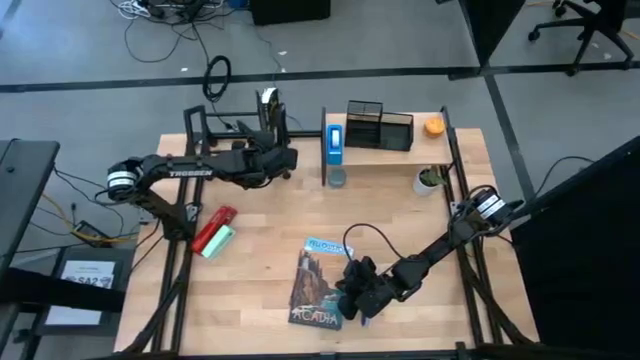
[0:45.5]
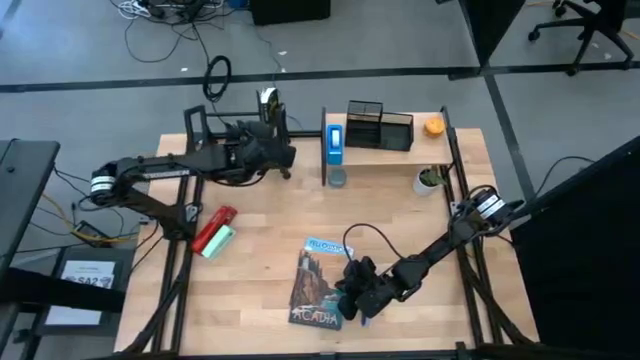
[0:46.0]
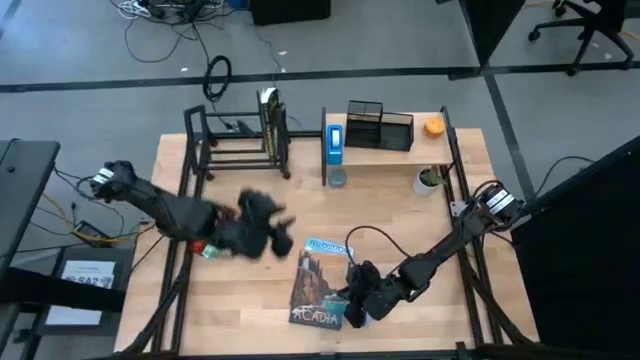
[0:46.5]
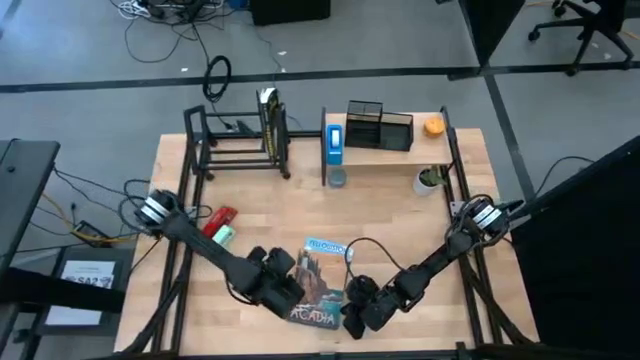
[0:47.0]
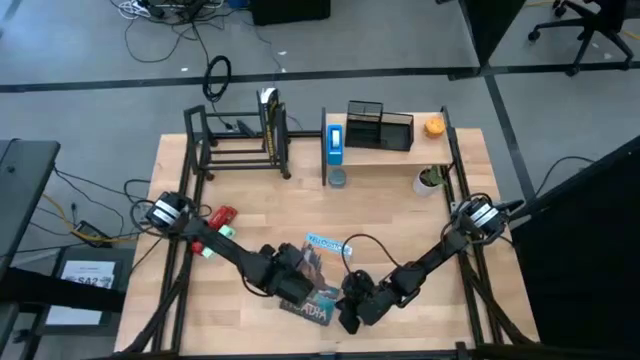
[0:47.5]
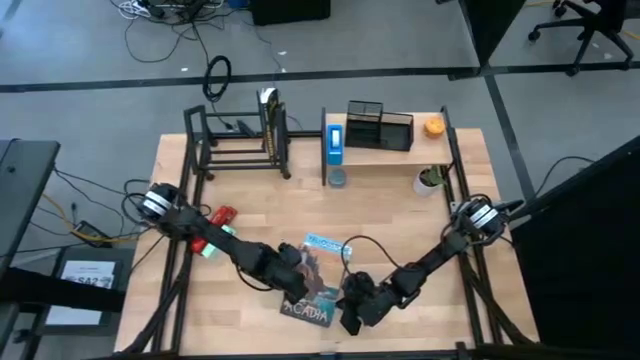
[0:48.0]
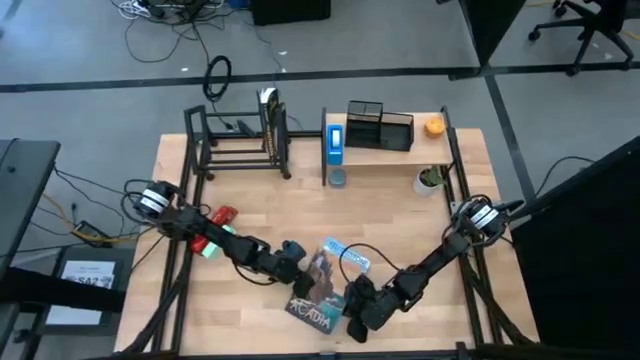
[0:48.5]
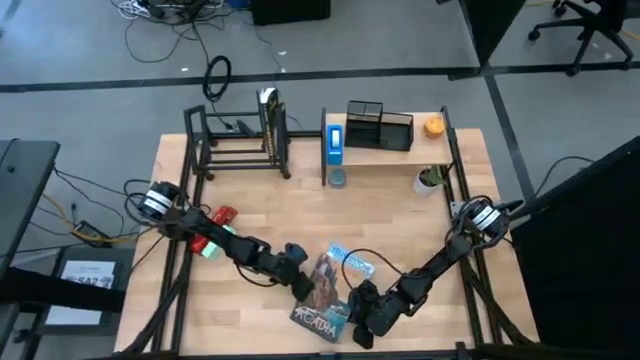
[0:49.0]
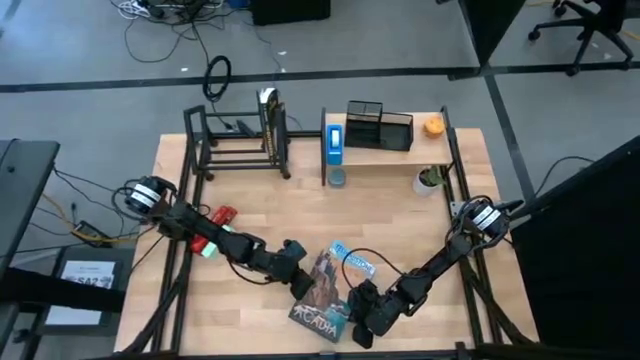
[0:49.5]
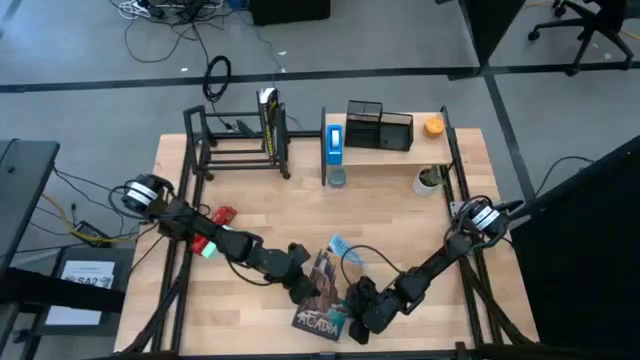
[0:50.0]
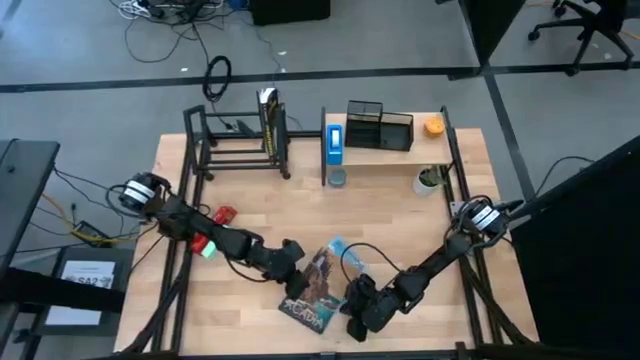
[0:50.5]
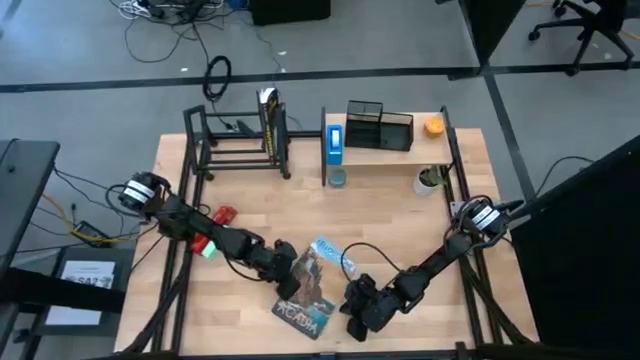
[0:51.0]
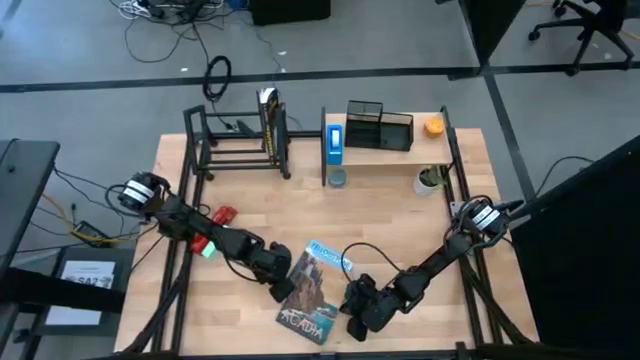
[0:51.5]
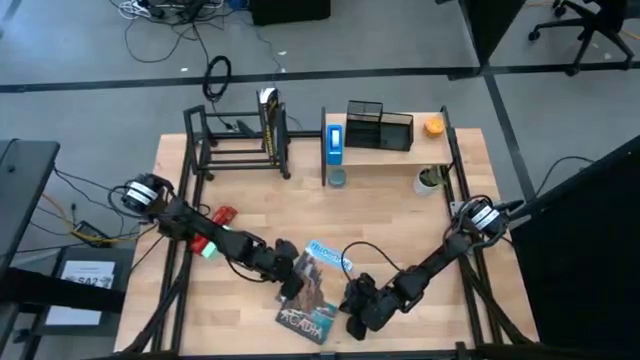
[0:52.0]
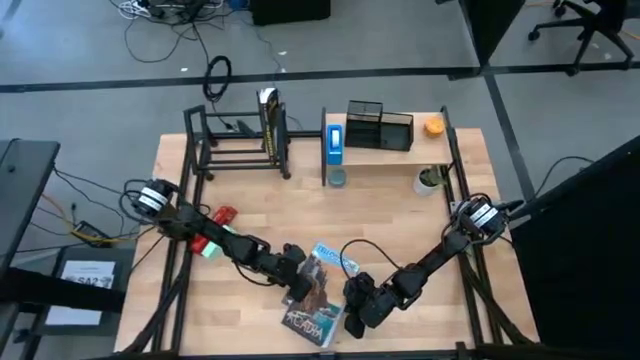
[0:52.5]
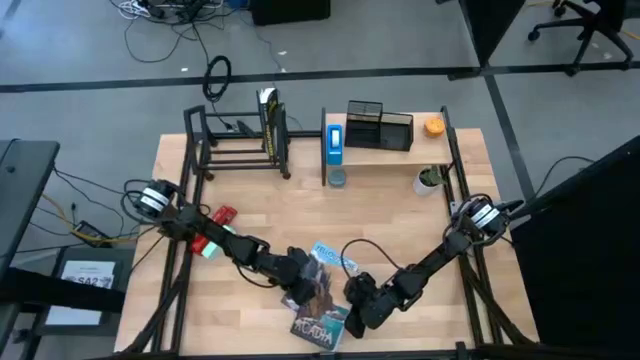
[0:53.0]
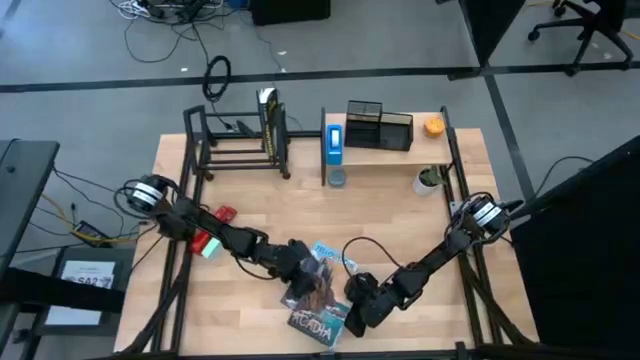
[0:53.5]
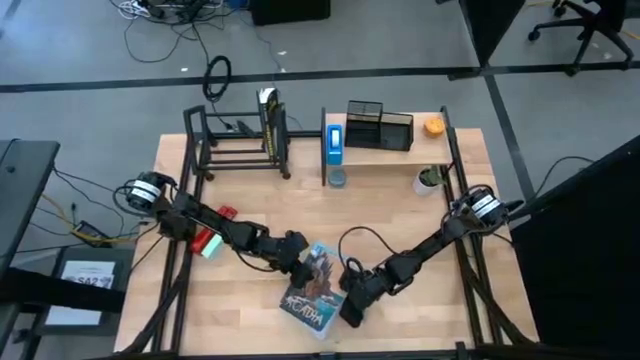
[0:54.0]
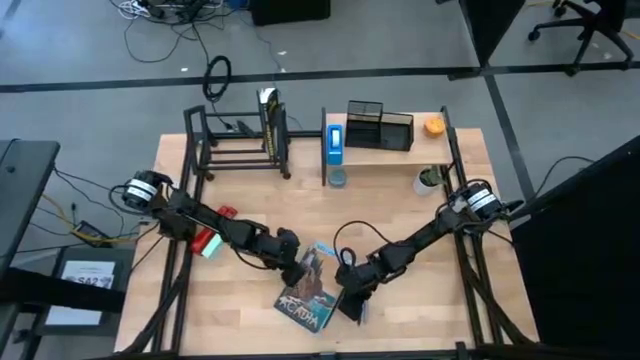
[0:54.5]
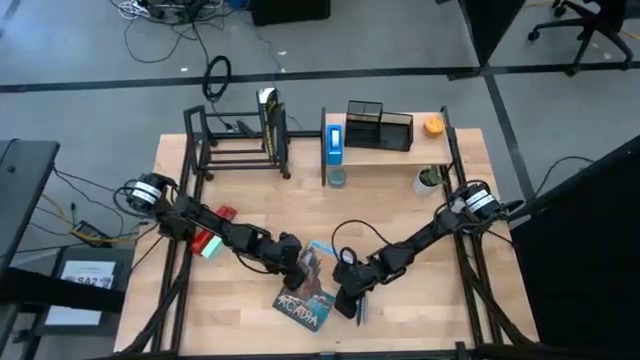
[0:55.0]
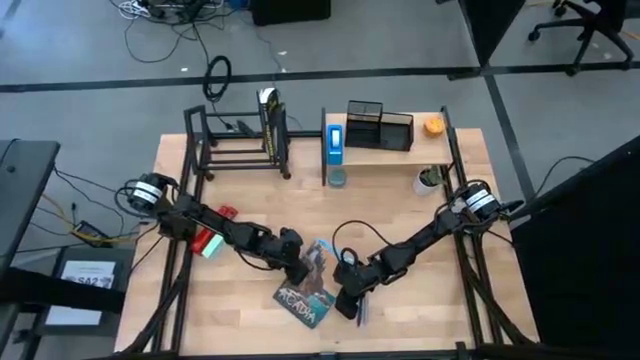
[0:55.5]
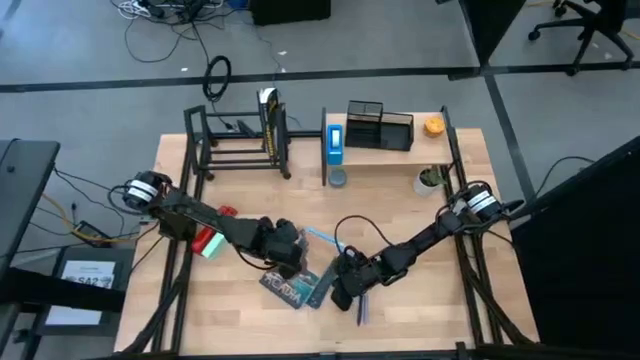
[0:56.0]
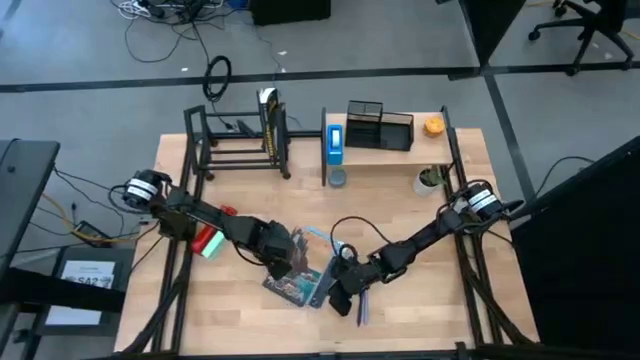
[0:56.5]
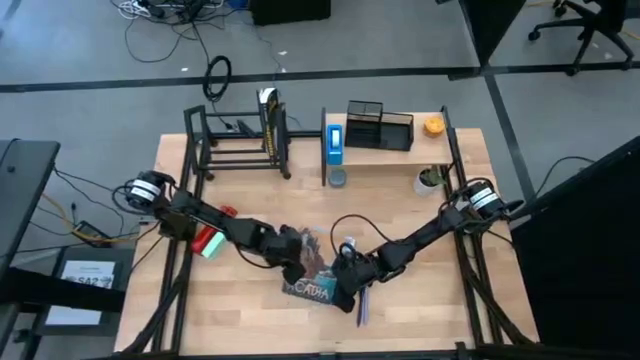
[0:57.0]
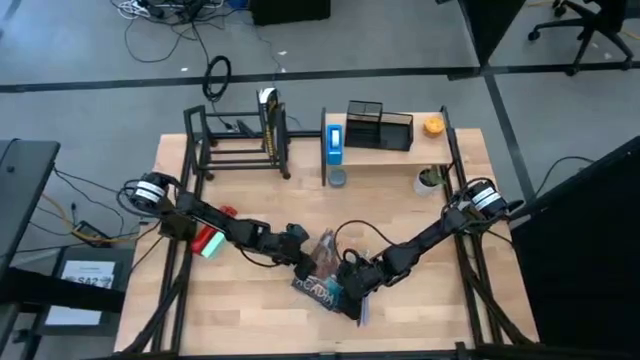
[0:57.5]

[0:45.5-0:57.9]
Task: Stock shelves
Put the brown book on the book organizer

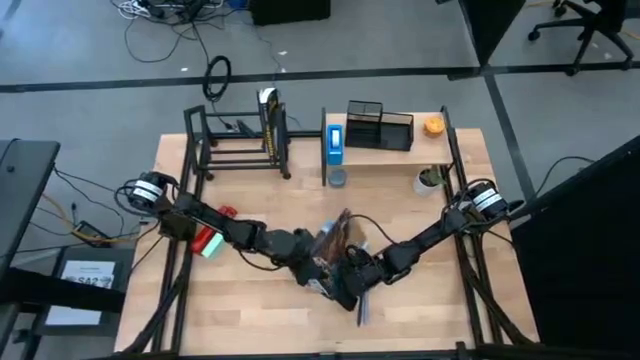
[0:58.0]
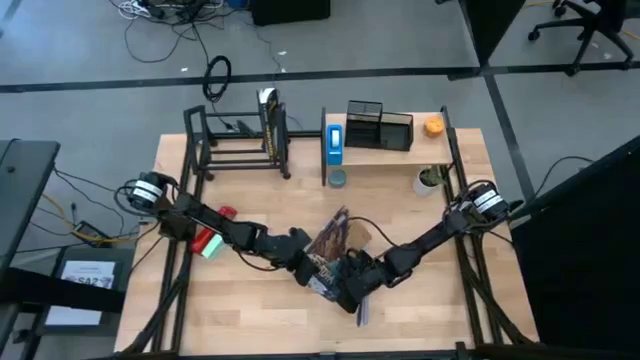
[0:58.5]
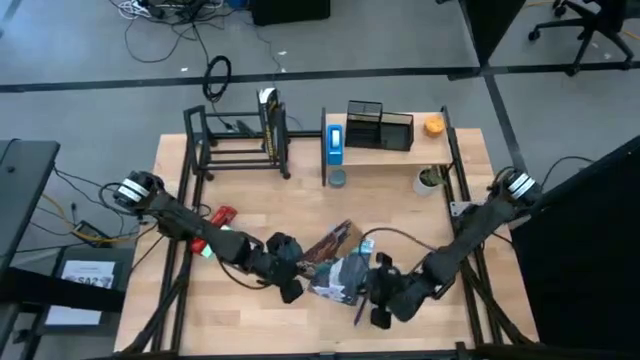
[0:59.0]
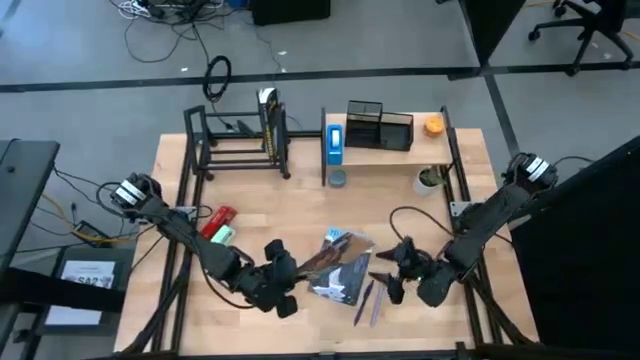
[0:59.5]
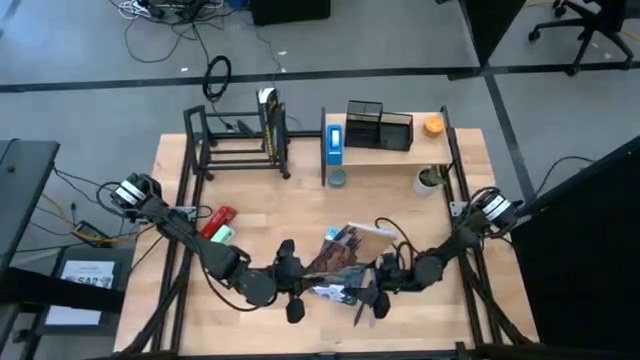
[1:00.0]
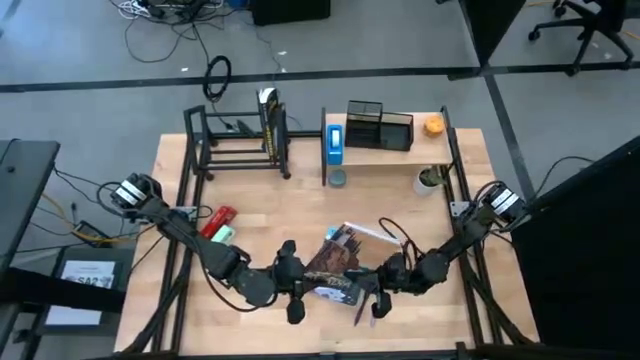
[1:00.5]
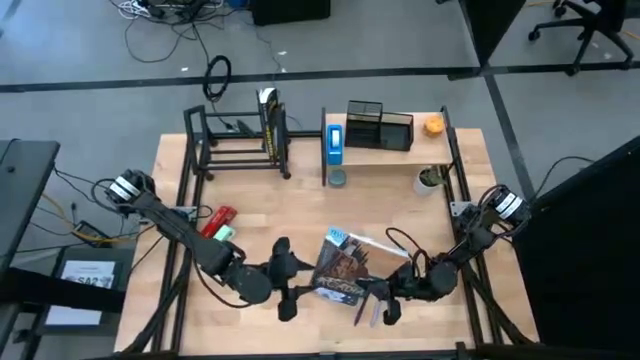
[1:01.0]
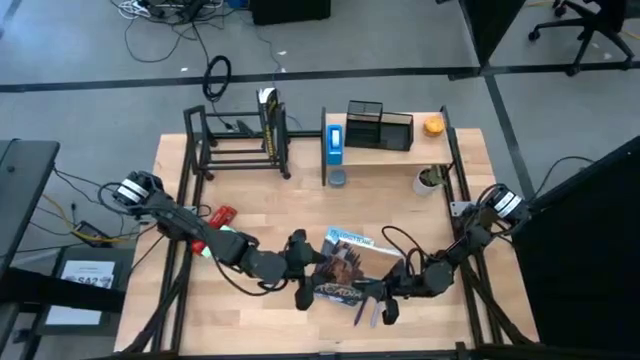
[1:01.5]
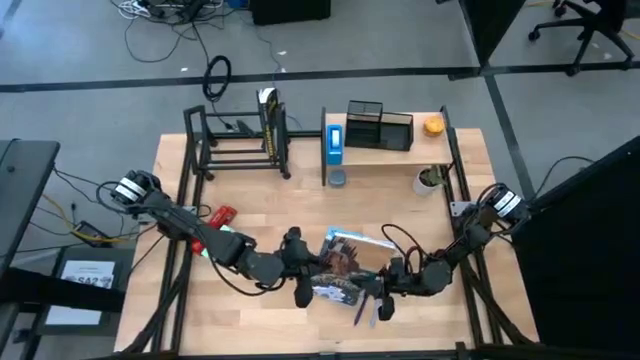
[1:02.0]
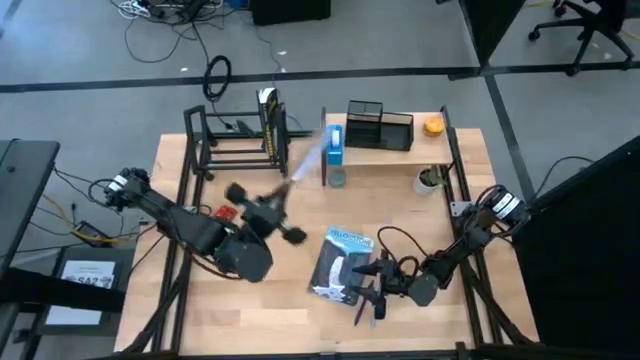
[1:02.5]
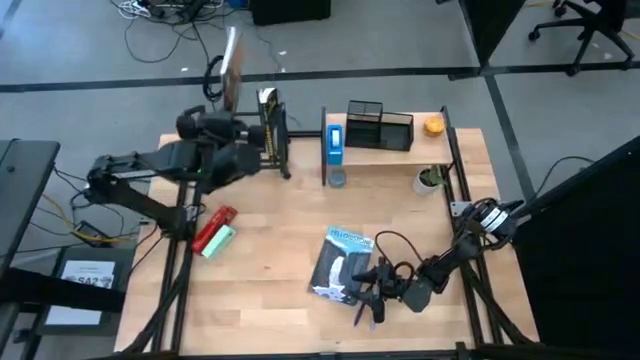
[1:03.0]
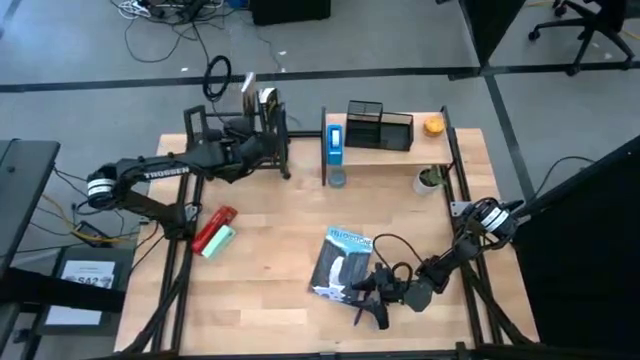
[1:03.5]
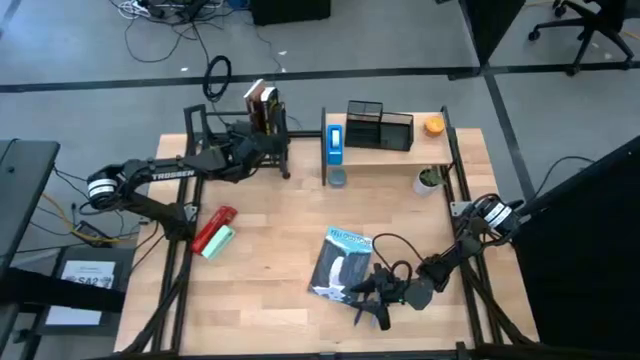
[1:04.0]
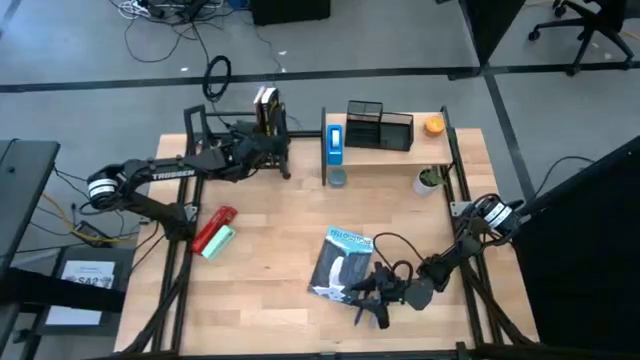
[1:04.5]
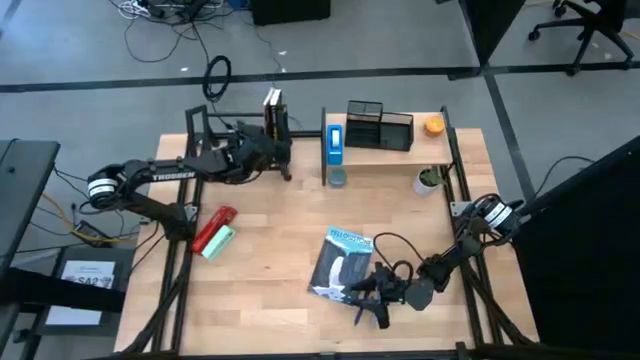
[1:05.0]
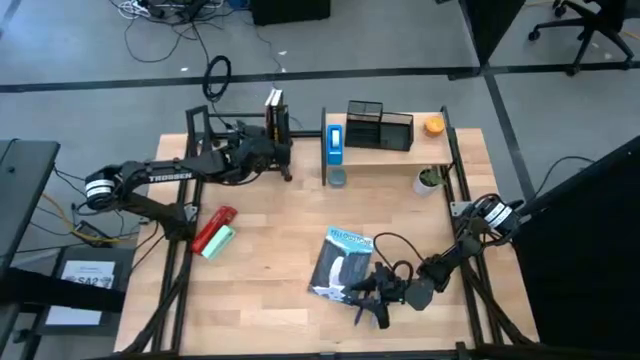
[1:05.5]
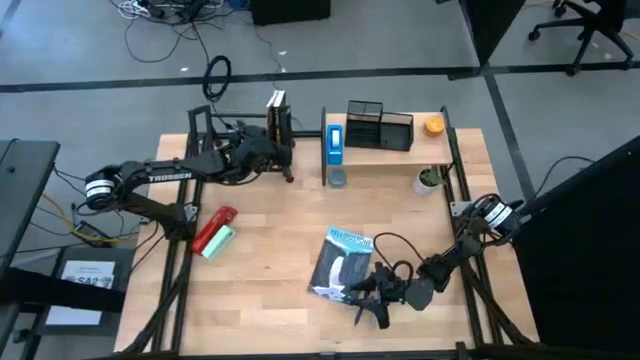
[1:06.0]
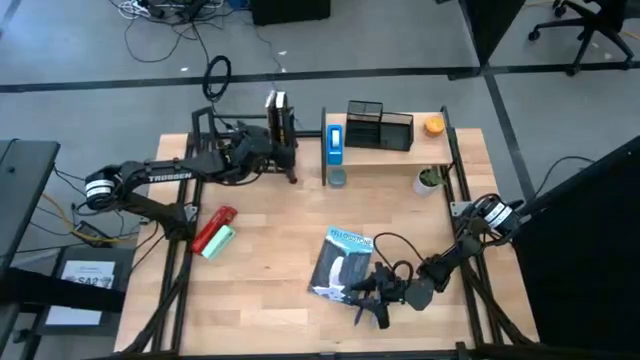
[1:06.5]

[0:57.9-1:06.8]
Put the brown book on the book organizer
